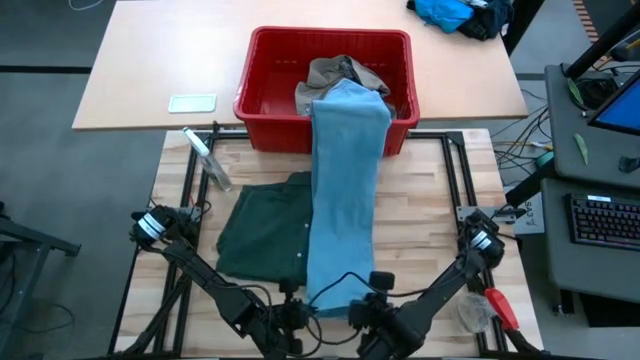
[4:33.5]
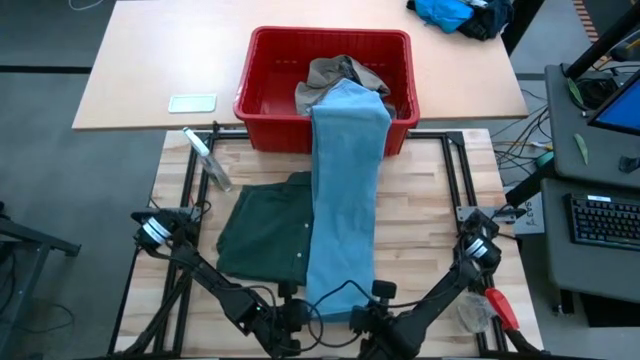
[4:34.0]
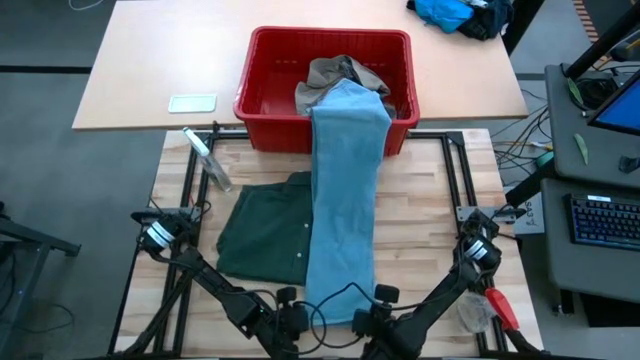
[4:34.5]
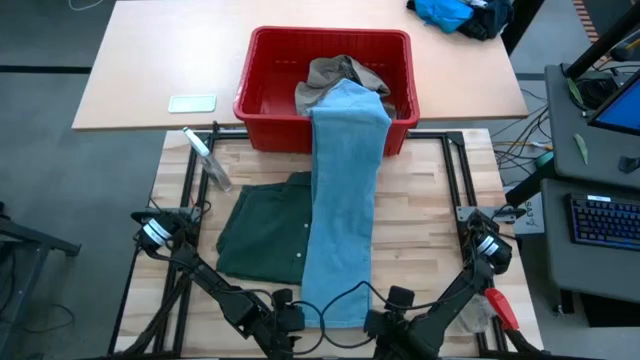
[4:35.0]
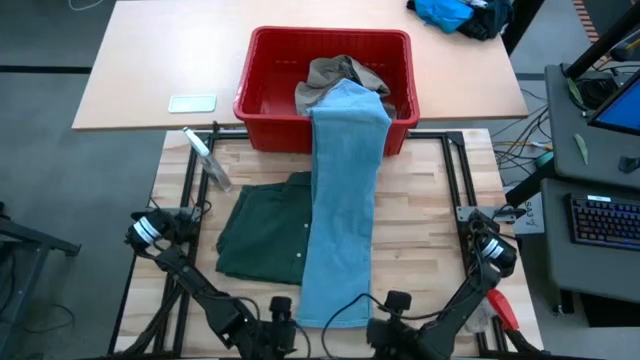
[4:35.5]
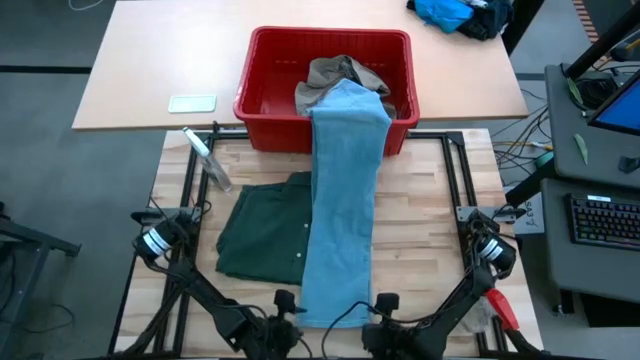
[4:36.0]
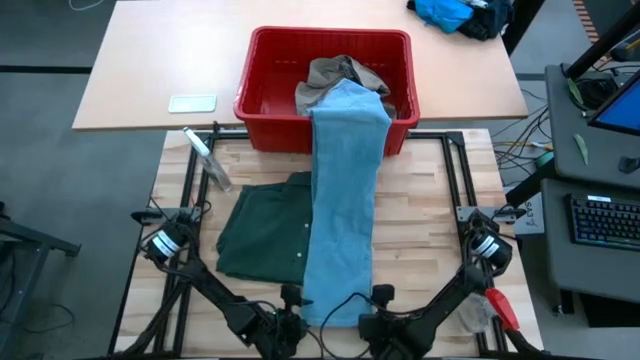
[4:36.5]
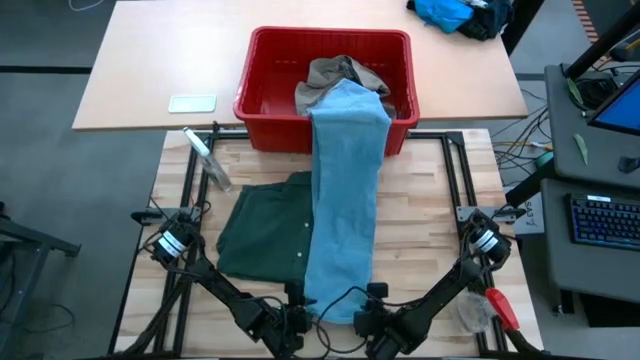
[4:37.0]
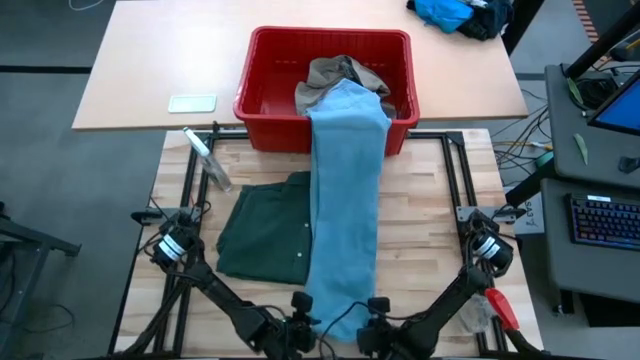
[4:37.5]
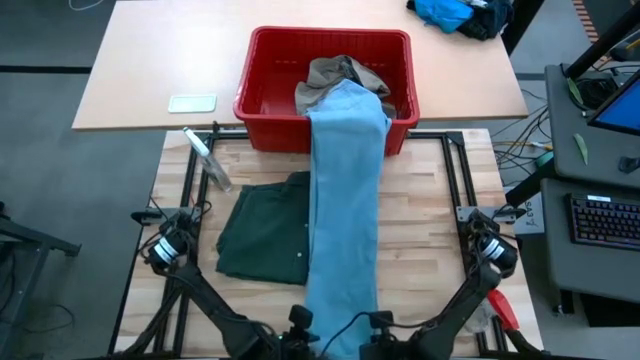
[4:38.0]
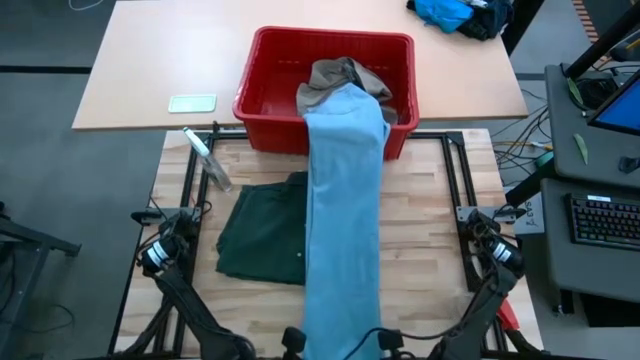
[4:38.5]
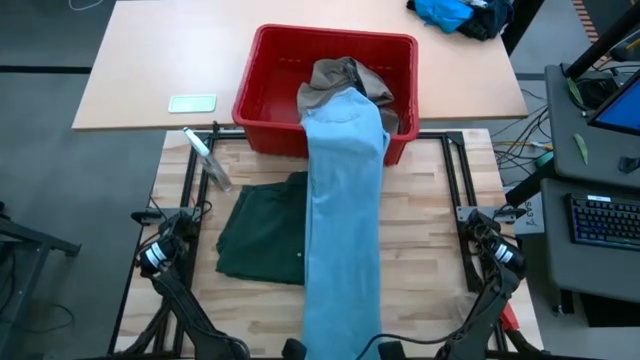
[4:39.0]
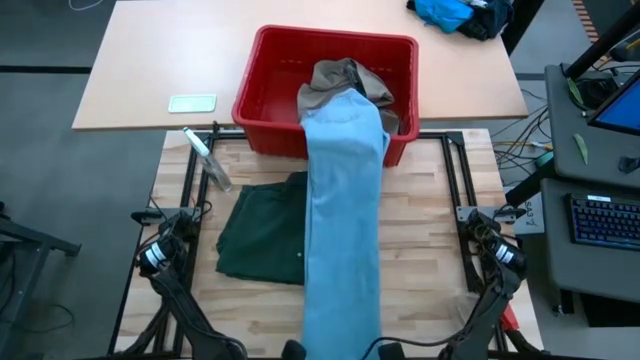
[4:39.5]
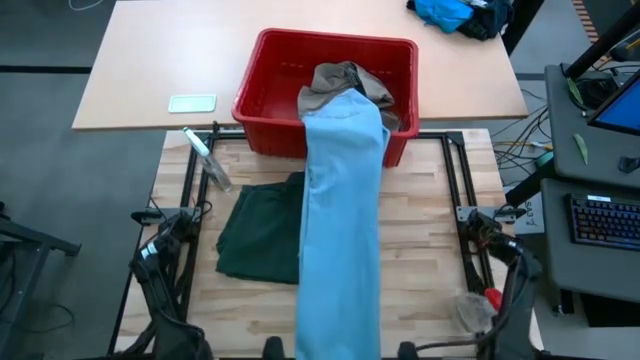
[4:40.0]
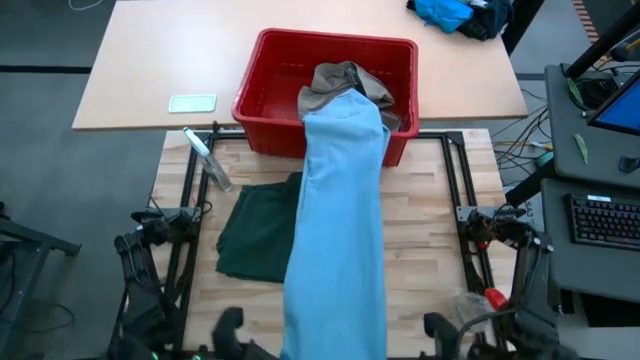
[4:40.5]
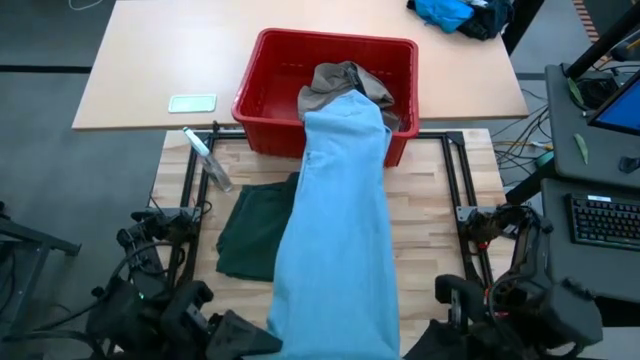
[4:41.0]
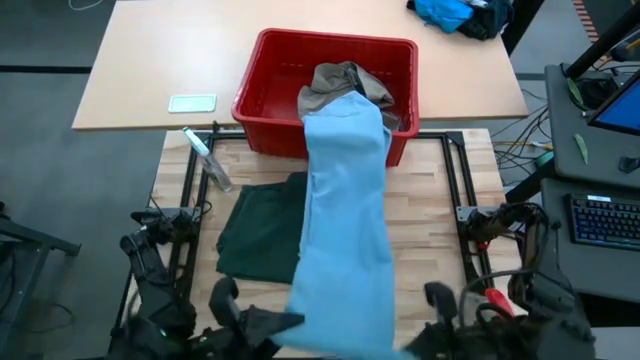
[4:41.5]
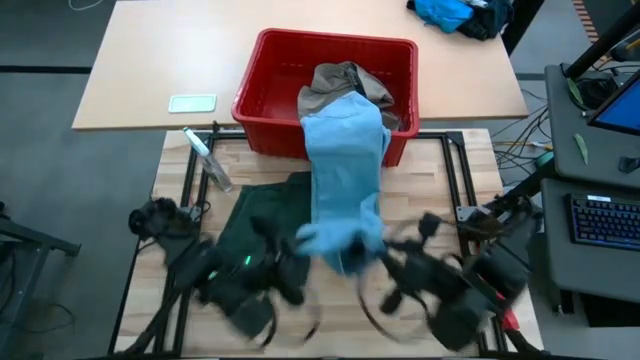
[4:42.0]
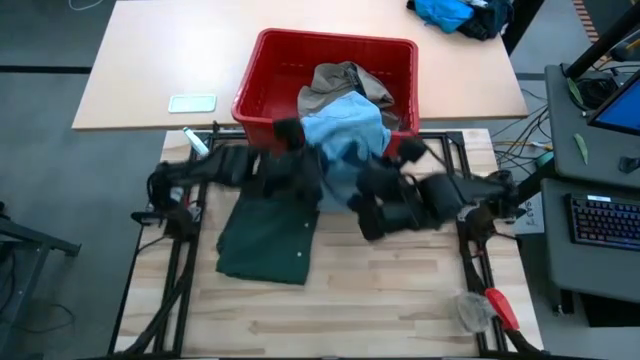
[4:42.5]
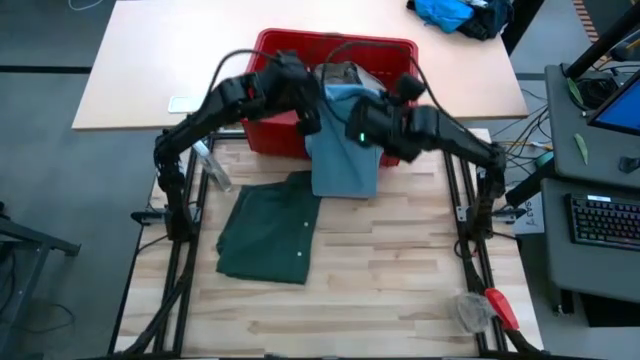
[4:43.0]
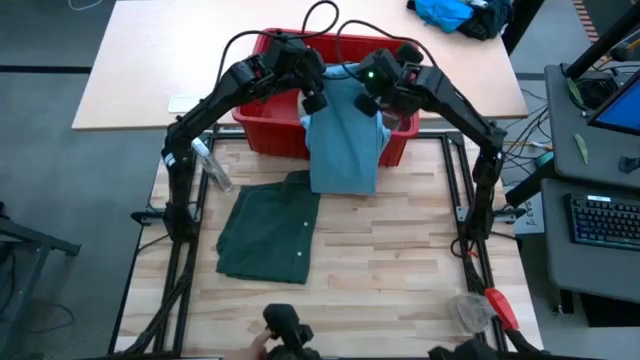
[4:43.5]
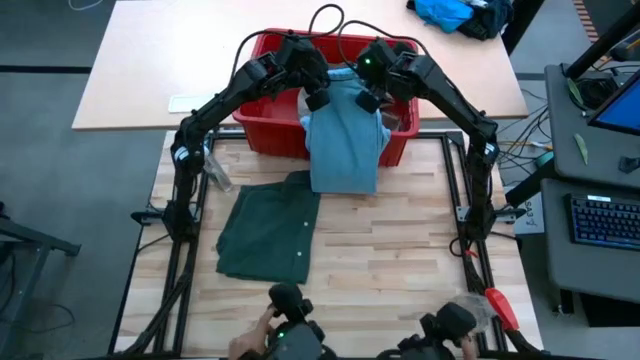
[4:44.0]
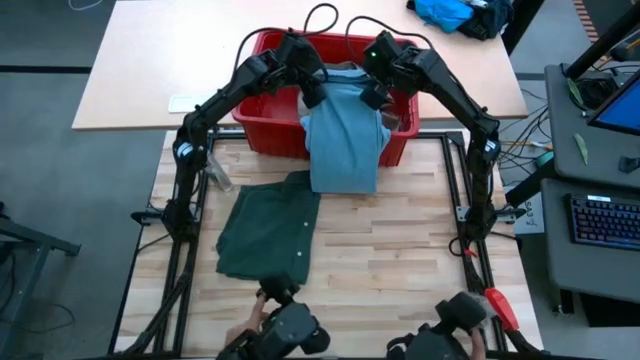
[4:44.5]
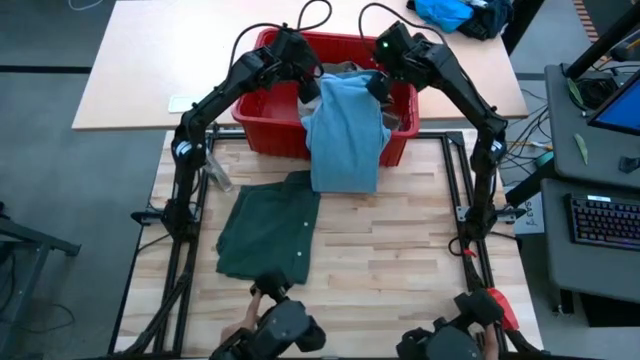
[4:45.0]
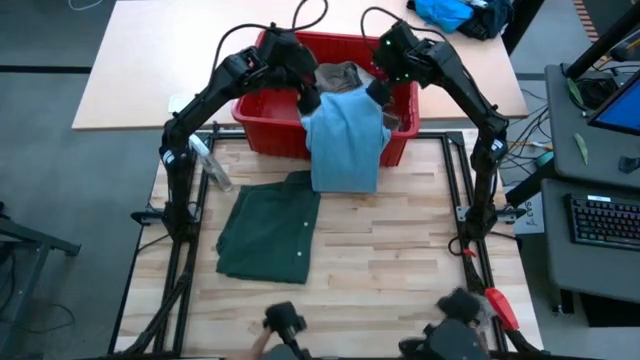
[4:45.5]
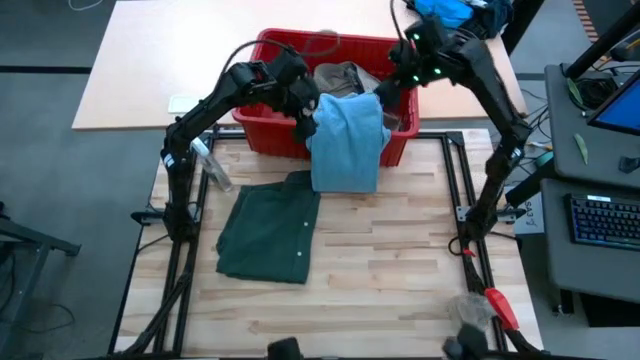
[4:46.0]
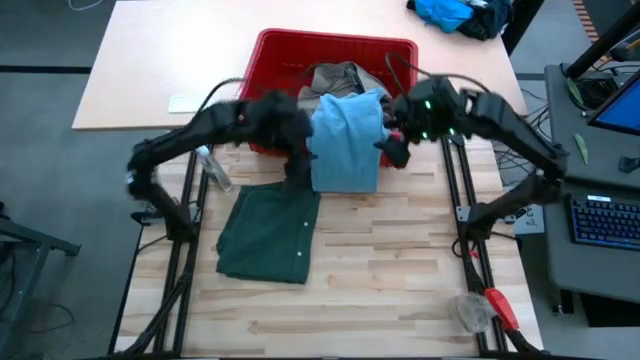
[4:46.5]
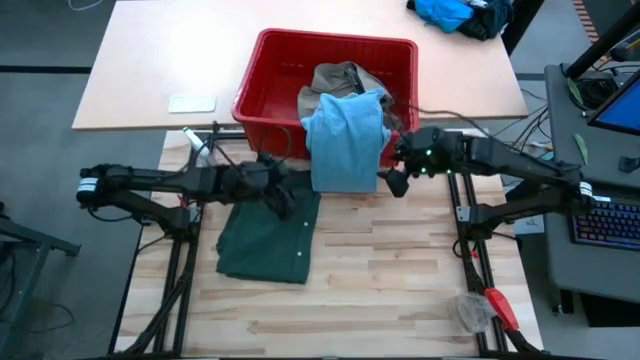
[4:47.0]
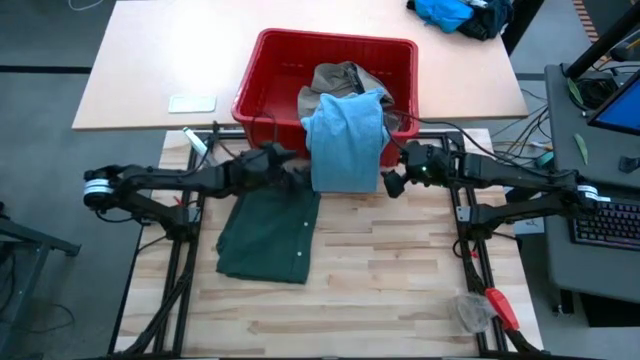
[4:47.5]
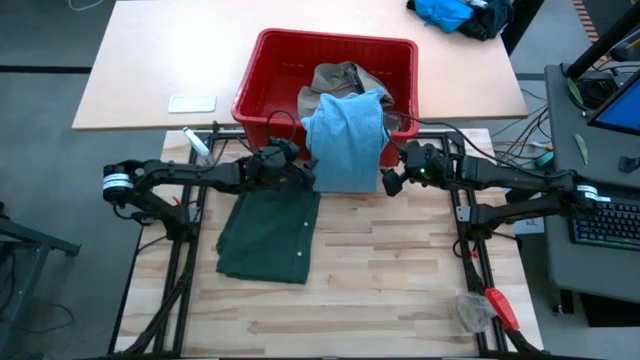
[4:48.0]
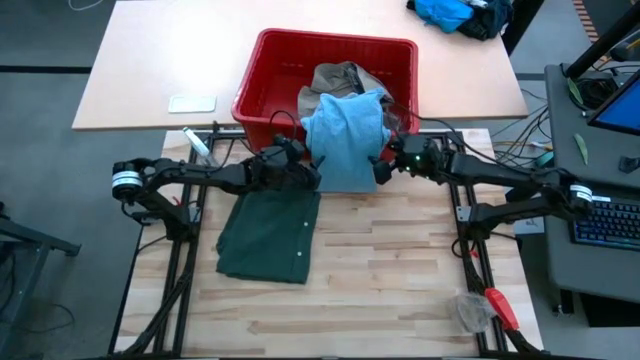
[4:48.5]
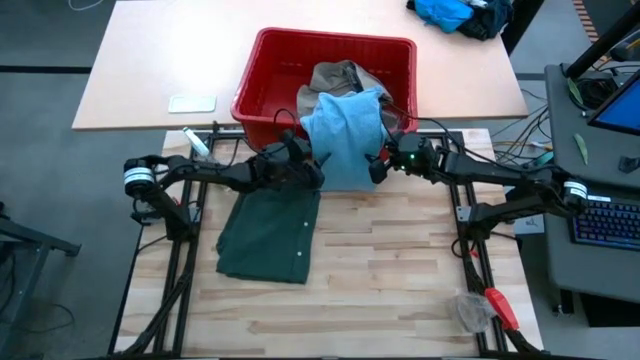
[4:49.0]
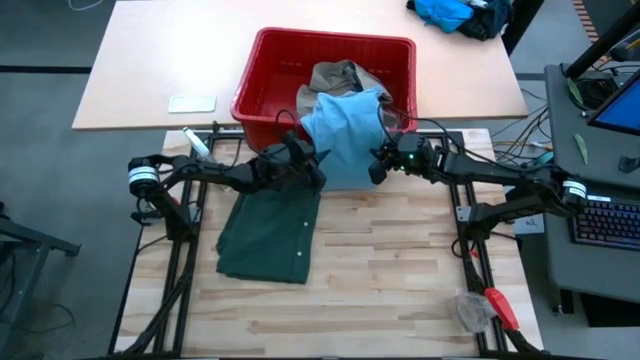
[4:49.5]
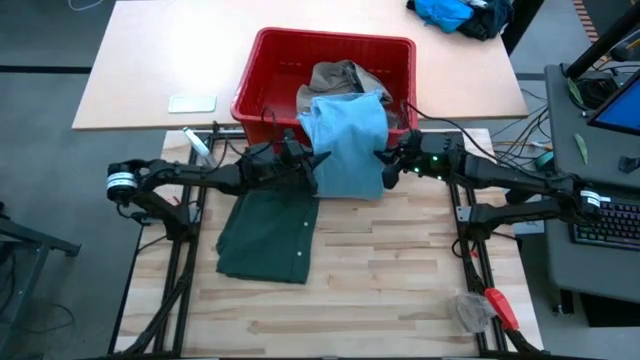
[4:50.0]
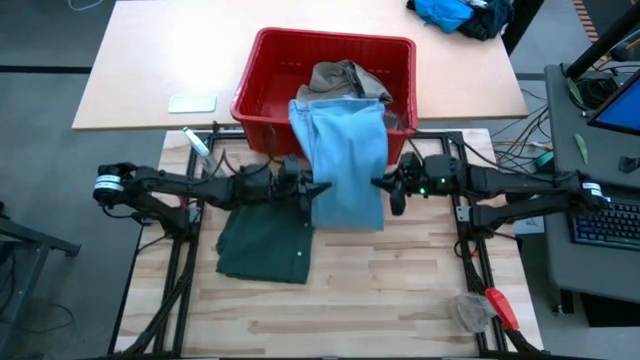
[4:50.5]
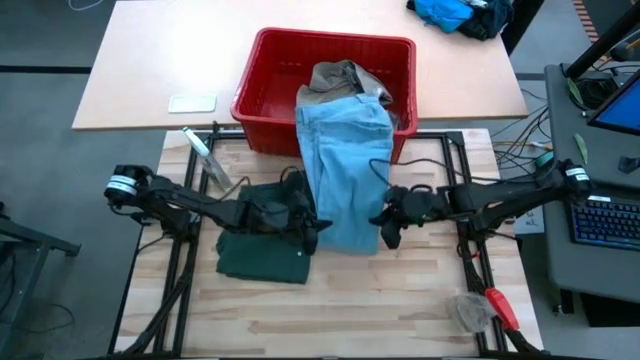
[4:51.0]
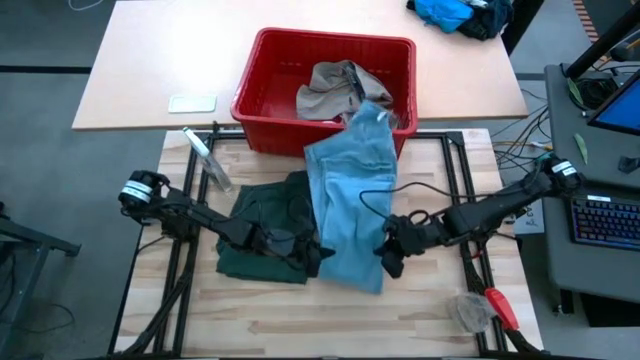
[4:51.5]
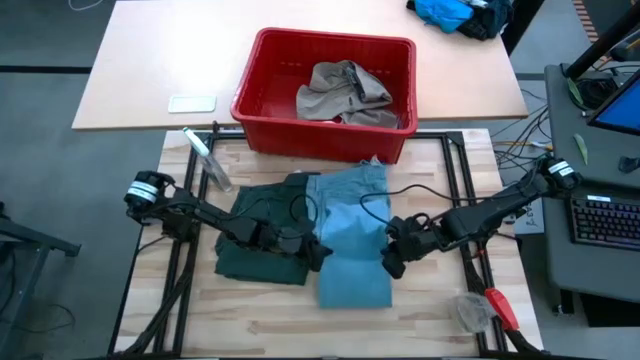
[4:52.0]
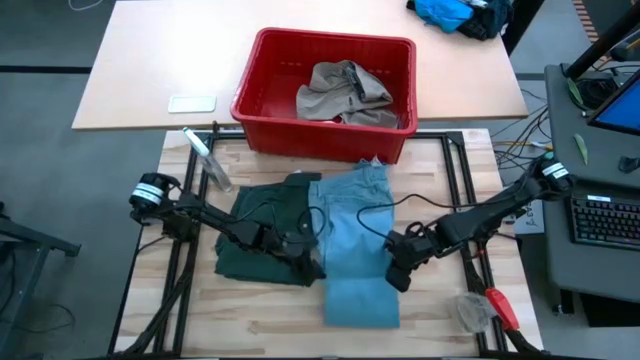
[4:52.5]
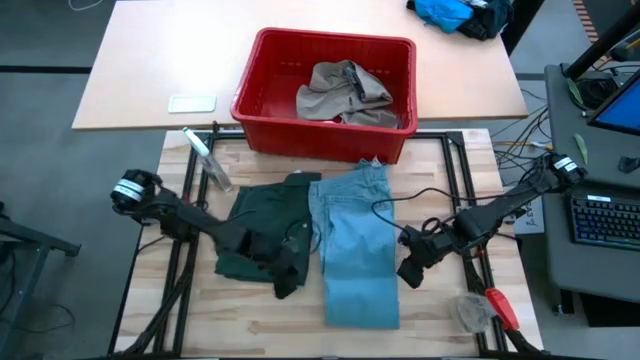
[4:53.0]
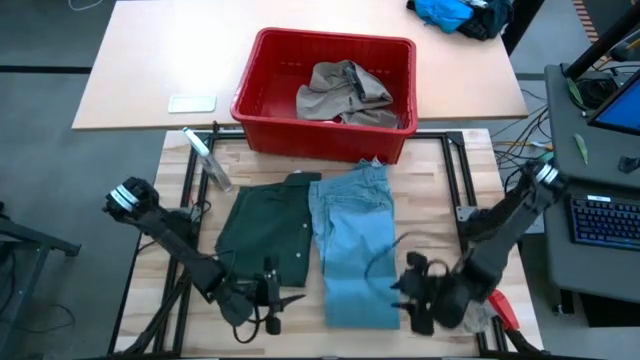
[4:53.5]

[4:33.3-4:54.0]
Task: Fold Laundry from Bin
Fold the blue jeans
